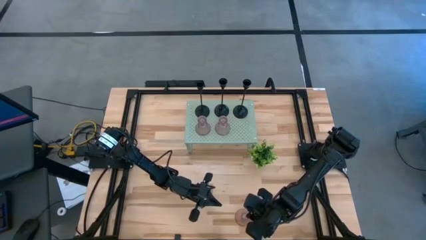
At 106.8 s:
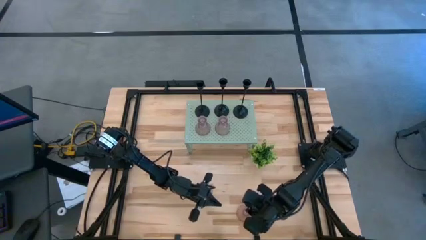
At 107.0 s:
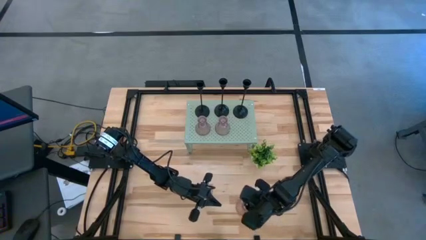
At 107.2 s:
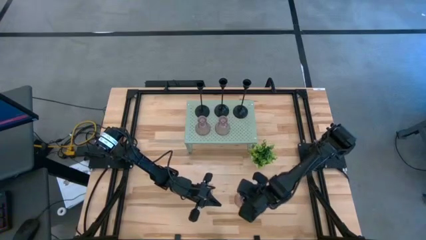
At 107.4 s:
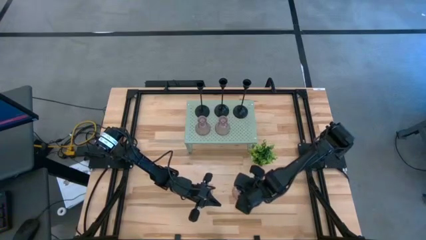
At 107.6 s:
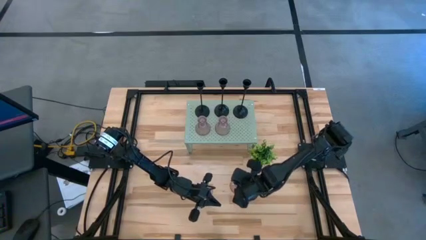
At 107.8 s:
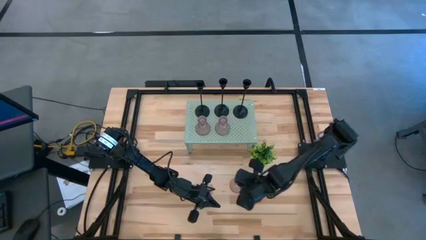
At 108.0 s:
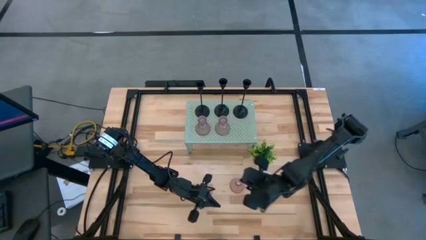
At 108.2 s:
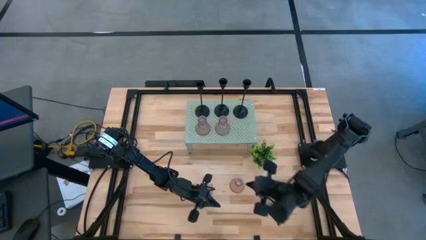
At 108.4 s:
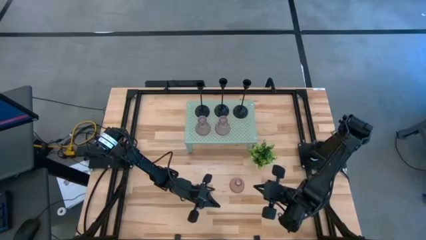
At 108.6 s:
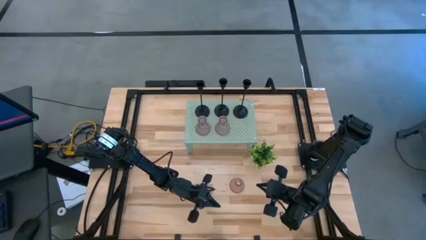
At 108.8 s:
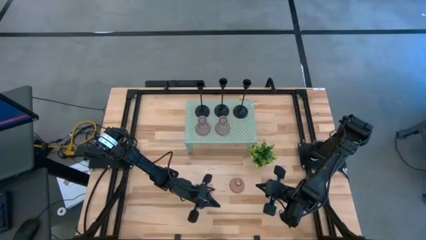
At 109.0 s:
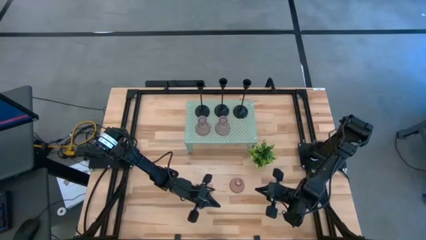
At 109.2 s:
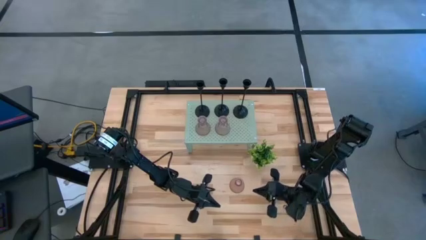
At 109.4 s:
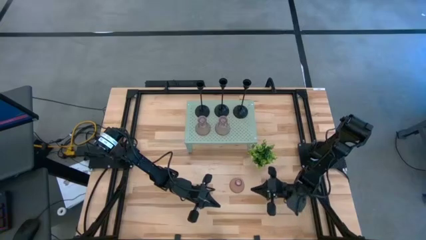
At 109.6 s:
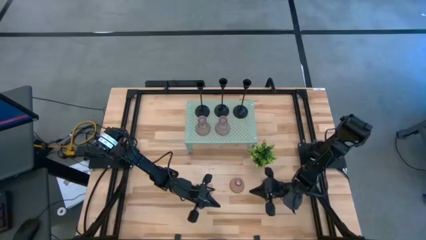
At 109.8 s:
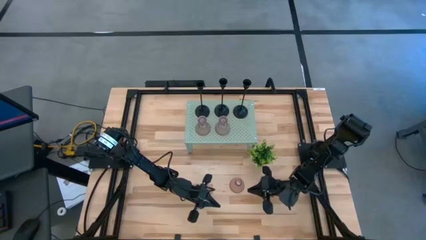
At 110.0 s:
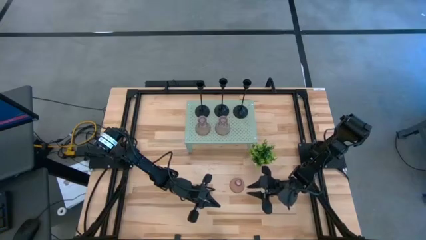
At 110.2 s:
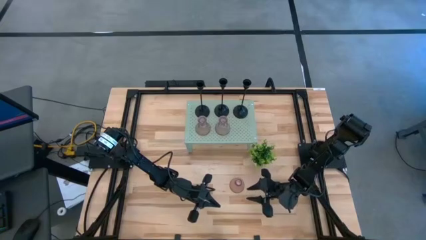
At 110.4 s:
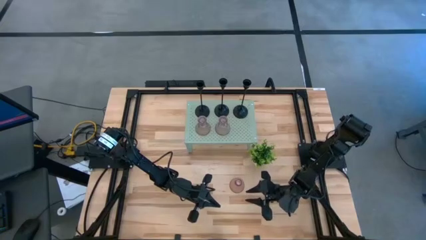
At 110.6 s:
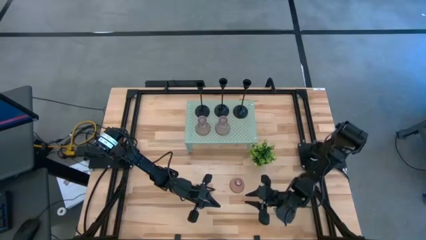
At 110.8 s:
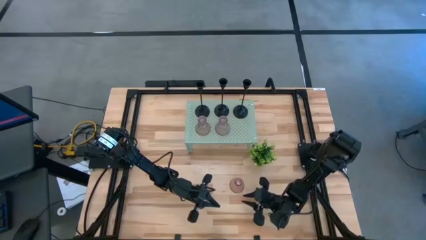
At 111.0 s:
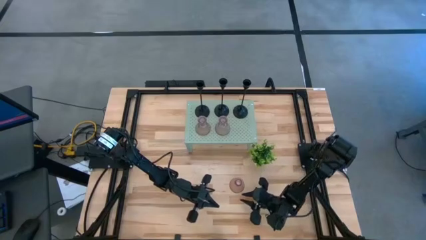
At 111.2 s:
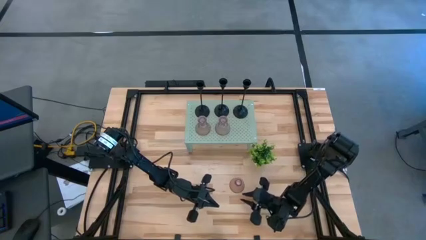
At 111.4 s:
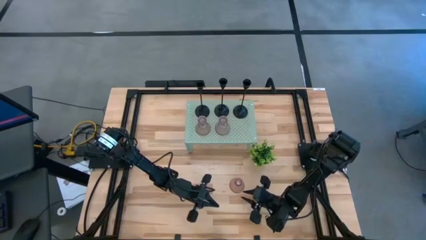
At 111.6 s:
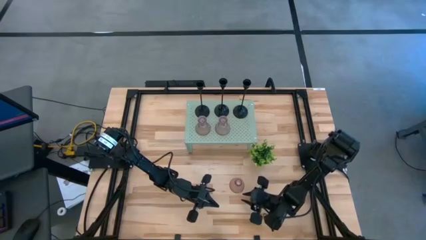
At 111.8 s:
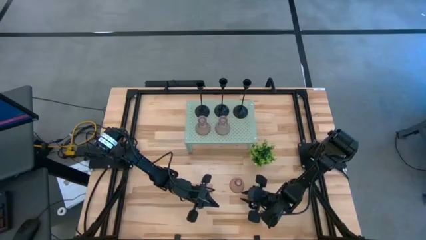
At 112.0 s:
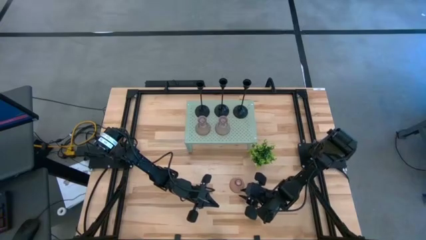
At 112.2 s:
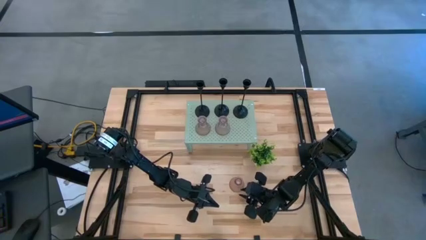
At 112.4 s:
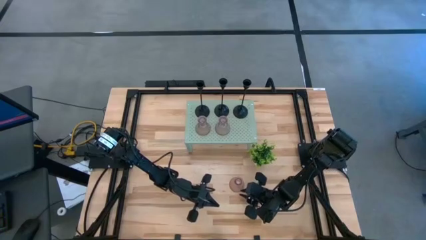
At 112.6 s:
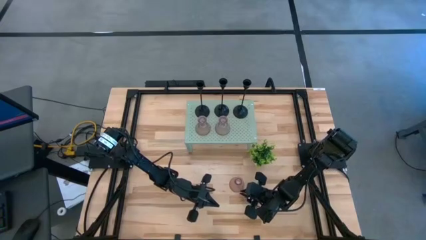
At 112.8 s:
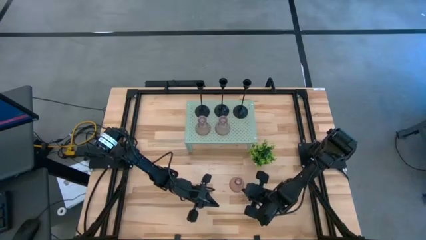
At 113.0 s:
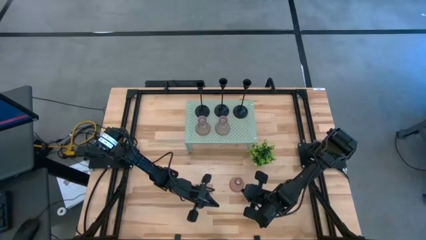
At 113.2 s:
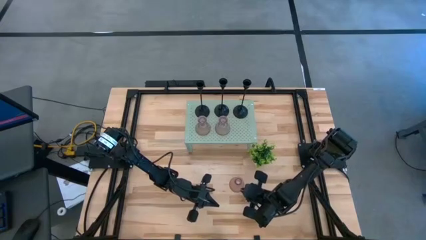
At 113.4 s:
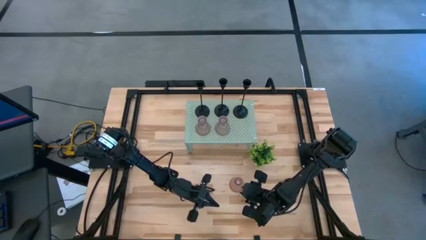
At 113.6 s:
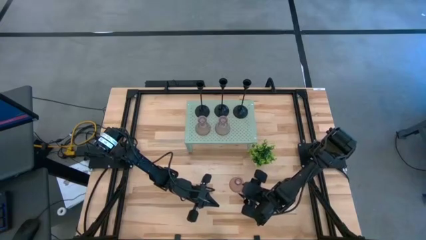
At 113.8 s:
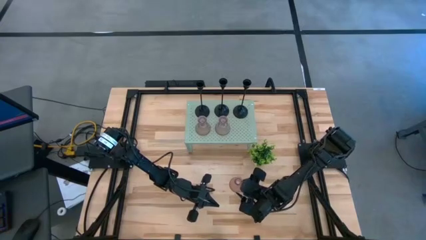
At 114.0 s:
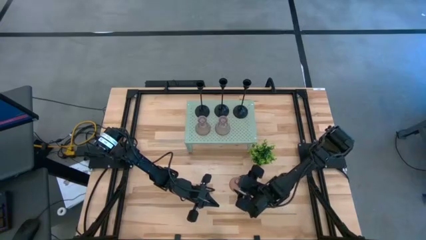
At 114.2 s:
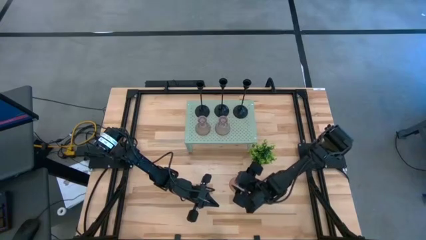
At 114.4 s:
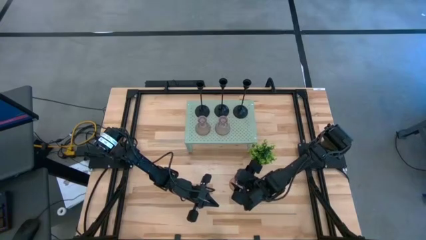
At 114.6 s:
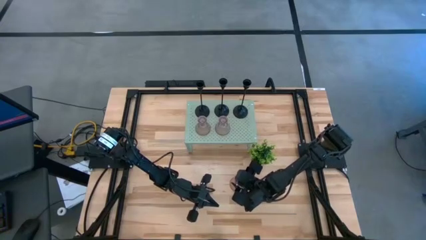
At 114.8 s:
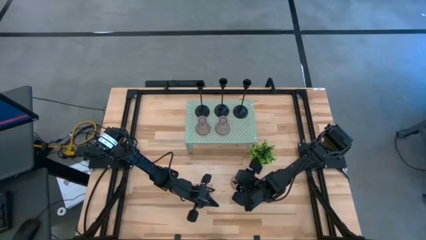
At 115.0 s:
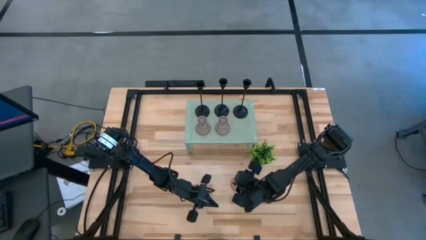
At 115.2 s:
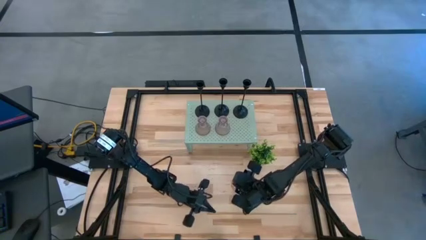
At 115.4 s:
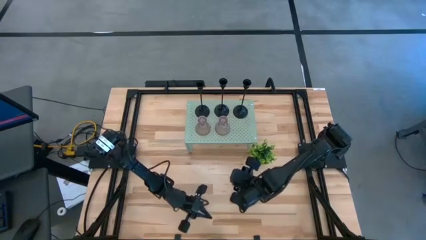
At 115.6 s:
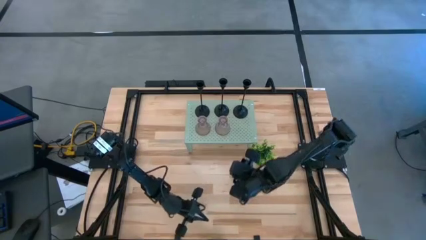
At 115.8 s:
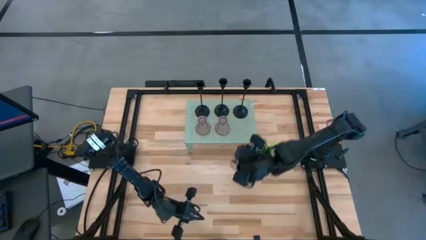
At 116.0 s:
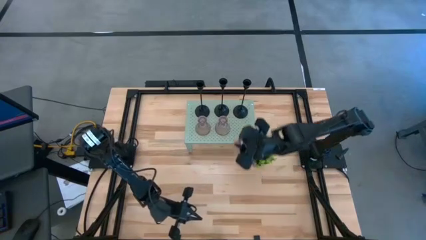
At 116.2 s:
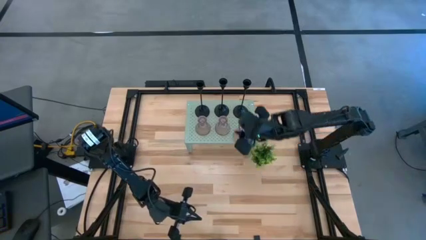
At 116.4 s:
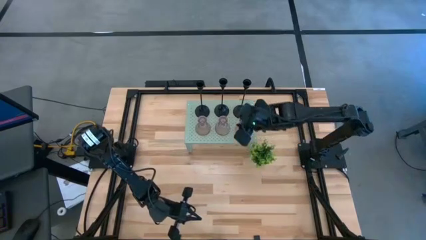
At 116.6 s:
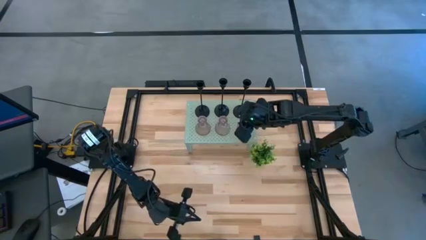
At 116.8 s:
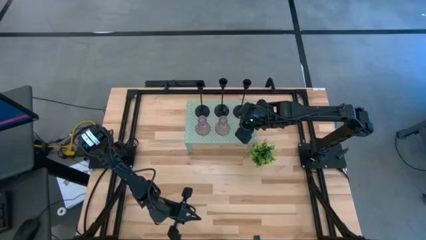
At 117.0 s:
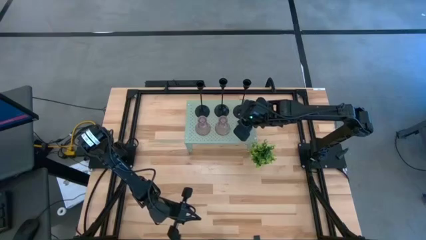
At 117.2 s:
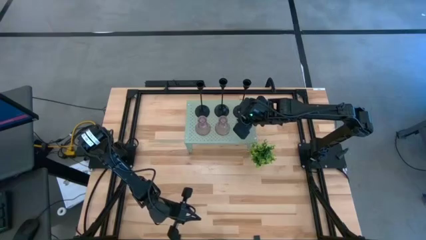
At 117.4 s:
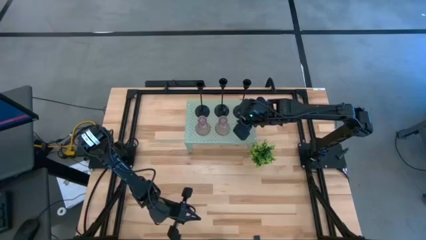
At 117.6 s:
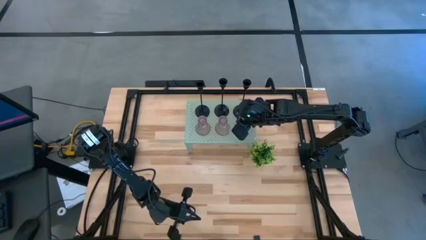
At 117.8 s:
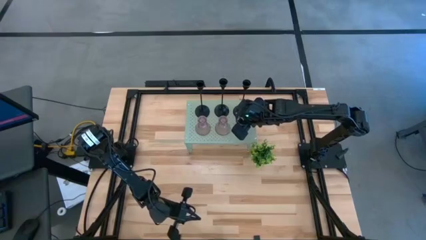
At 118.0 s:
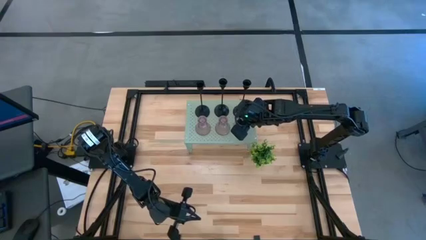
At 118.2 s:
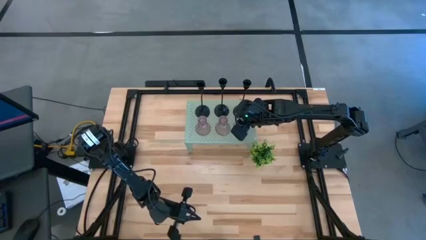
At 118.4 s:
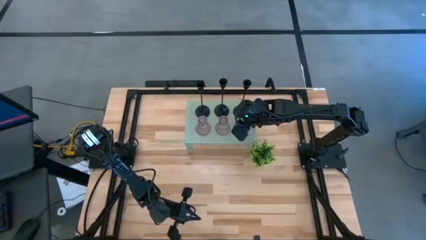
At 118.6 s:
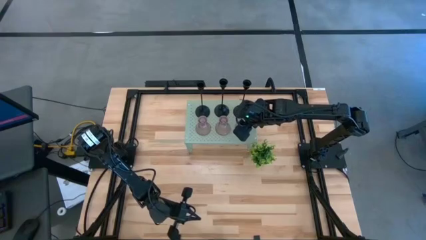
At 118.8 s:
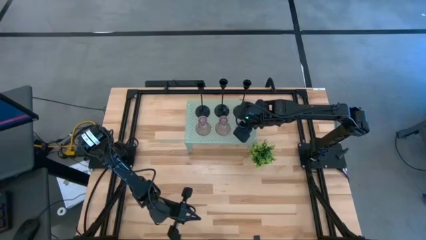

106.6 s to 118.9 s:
Task: Pick & Place candle stick holders
Align the pink candle holder on the shelf with the pink candle holders
